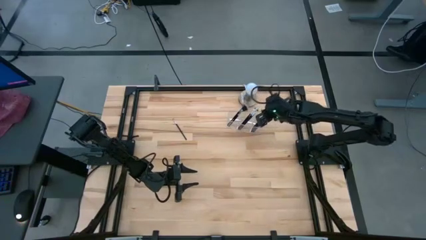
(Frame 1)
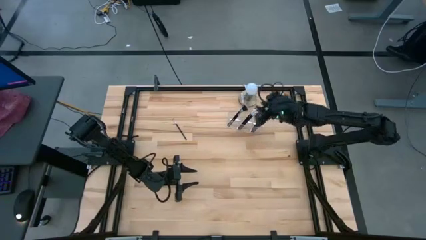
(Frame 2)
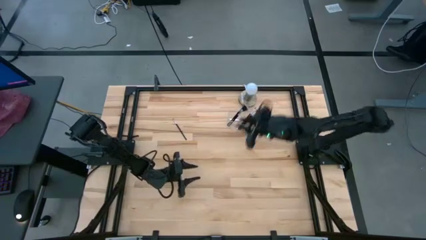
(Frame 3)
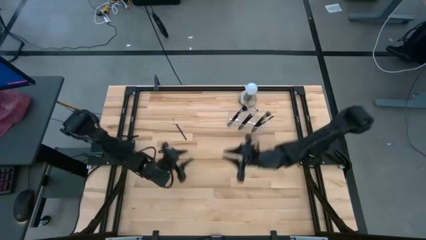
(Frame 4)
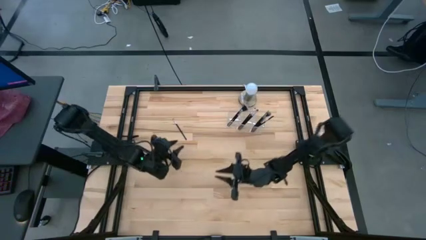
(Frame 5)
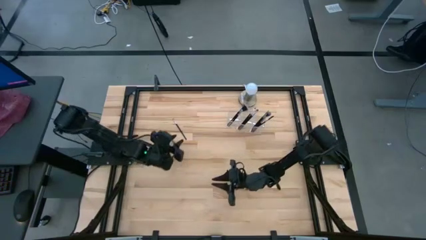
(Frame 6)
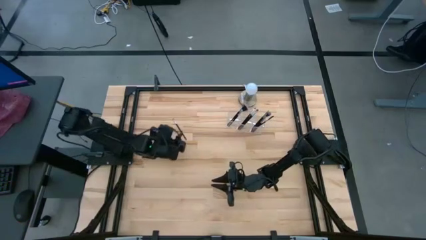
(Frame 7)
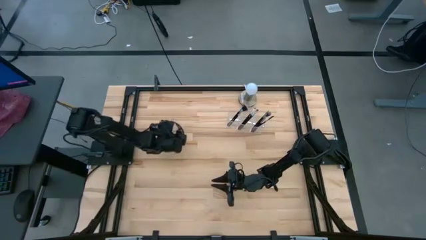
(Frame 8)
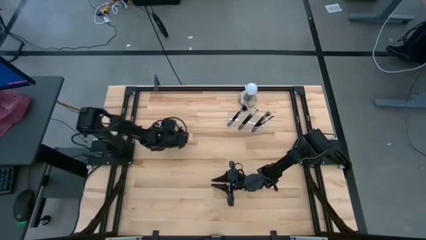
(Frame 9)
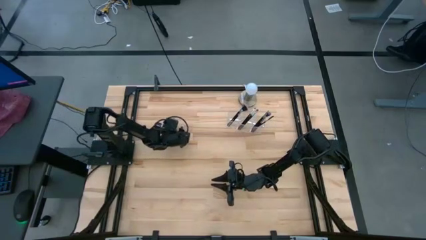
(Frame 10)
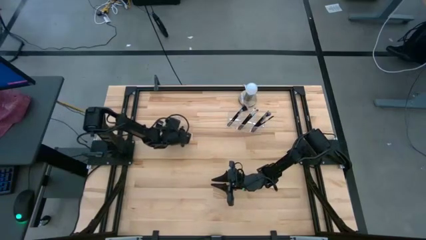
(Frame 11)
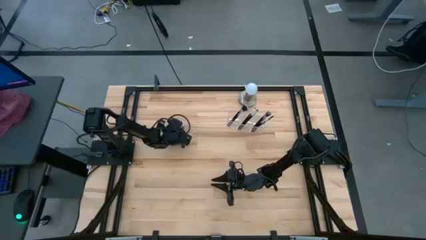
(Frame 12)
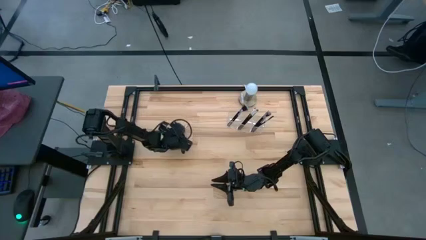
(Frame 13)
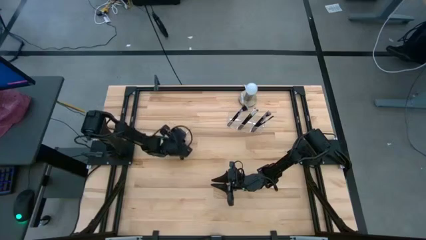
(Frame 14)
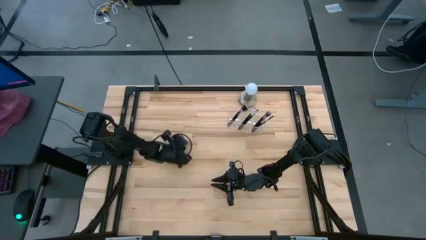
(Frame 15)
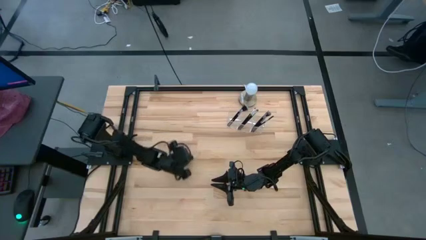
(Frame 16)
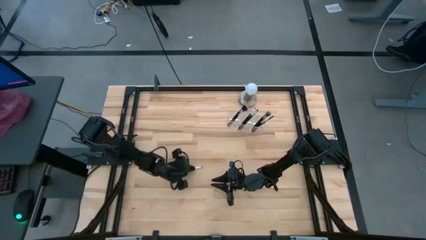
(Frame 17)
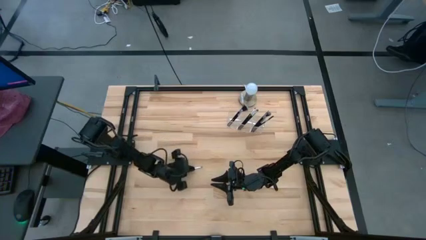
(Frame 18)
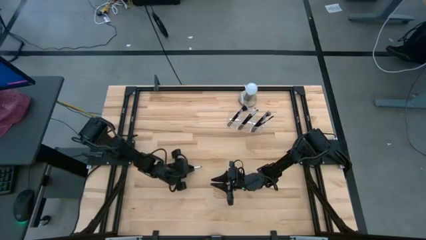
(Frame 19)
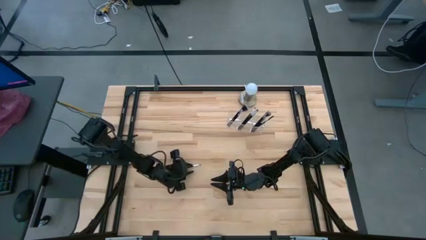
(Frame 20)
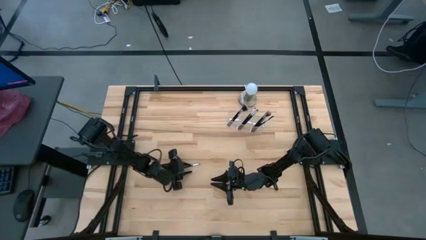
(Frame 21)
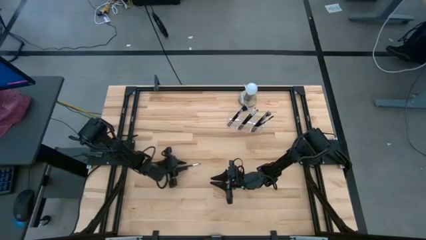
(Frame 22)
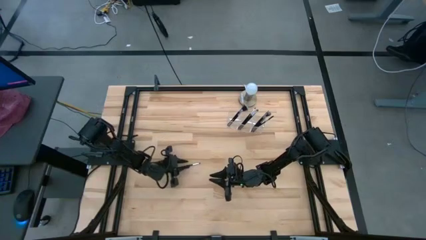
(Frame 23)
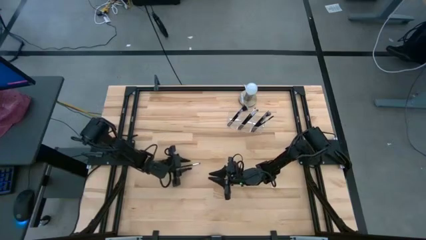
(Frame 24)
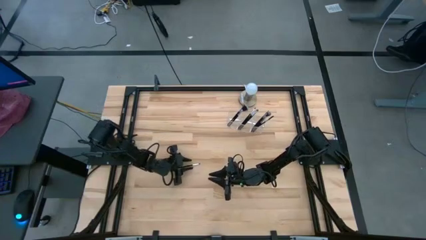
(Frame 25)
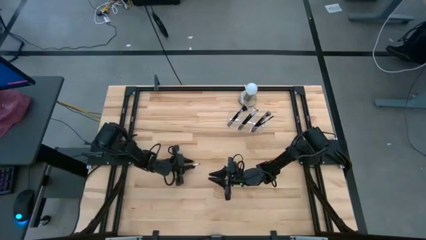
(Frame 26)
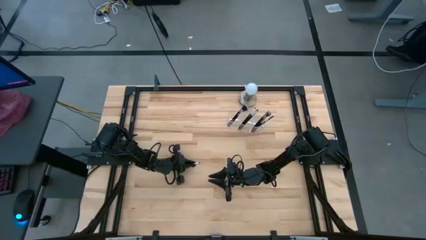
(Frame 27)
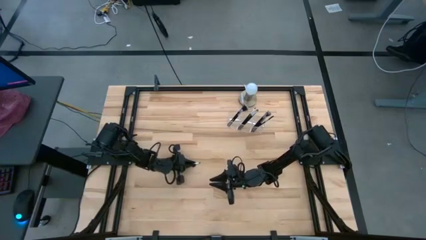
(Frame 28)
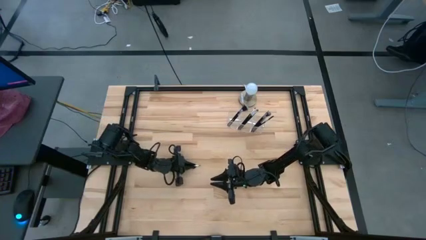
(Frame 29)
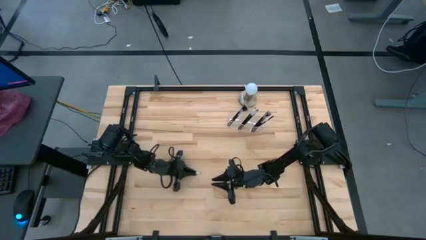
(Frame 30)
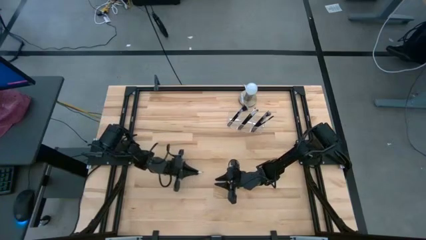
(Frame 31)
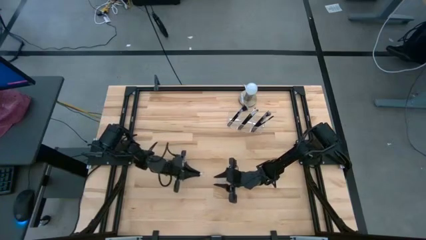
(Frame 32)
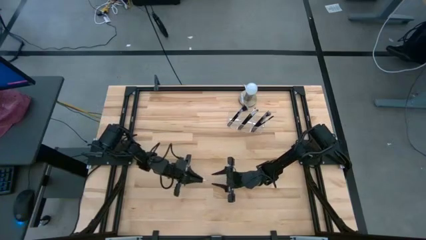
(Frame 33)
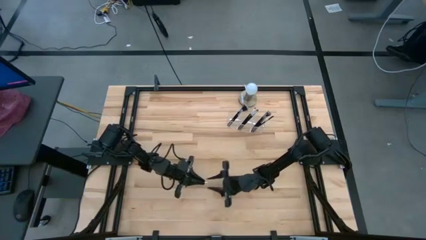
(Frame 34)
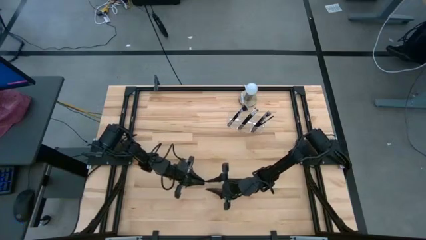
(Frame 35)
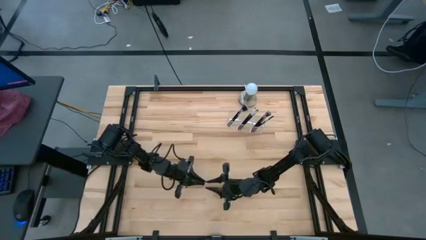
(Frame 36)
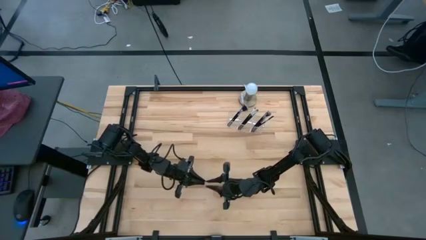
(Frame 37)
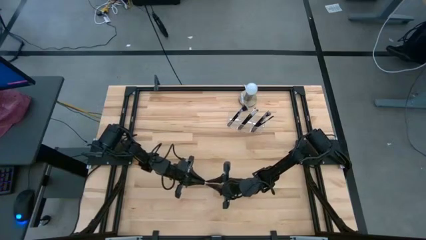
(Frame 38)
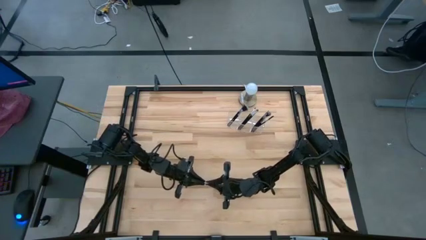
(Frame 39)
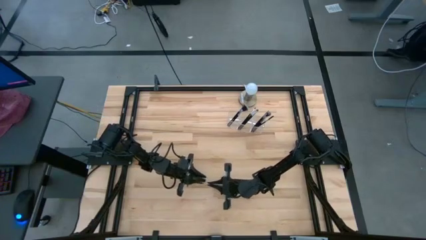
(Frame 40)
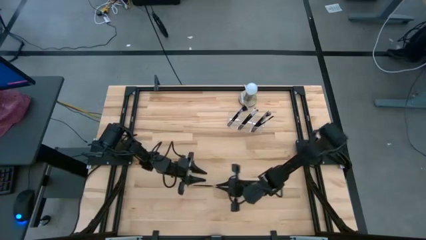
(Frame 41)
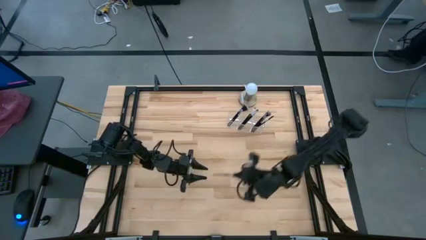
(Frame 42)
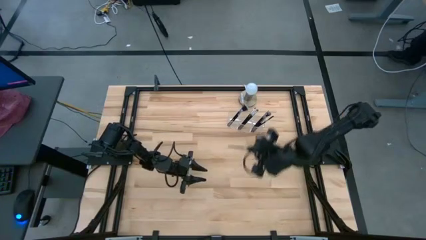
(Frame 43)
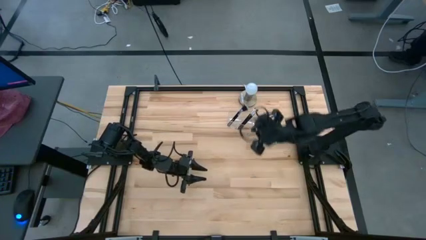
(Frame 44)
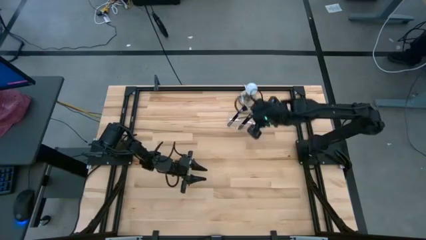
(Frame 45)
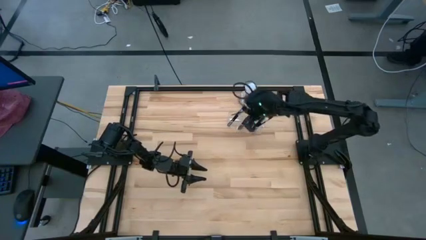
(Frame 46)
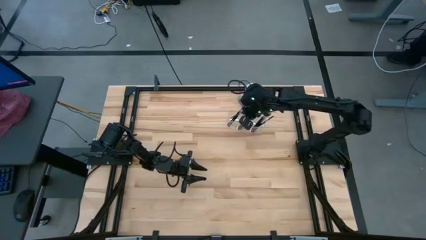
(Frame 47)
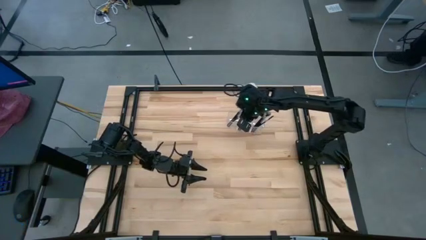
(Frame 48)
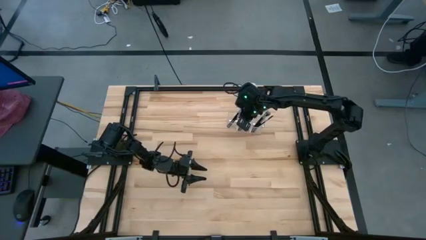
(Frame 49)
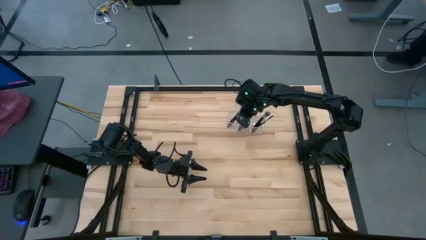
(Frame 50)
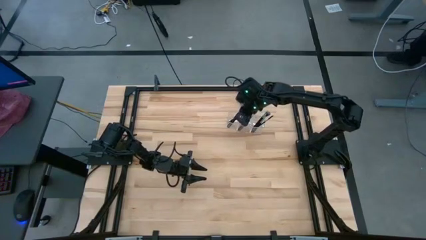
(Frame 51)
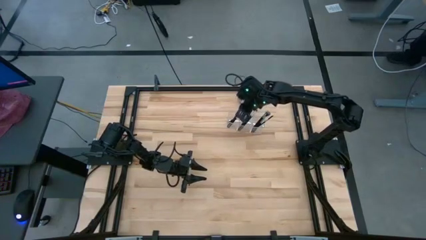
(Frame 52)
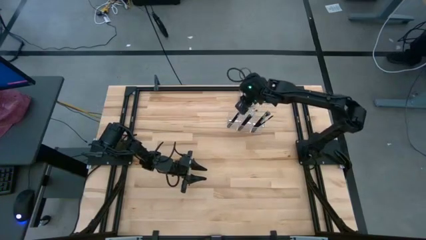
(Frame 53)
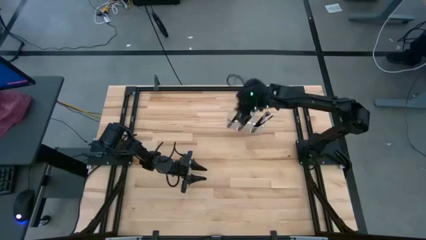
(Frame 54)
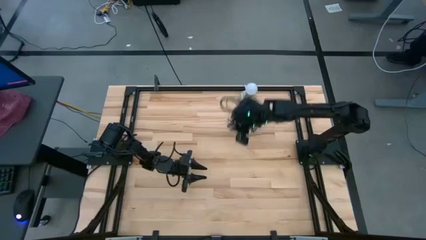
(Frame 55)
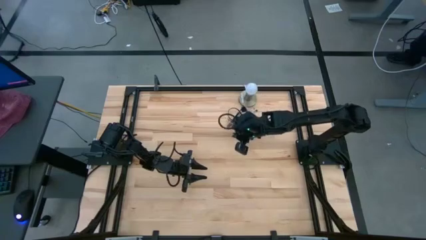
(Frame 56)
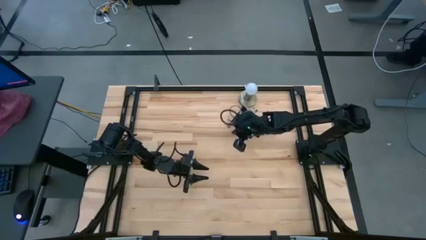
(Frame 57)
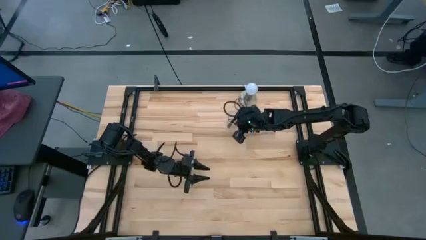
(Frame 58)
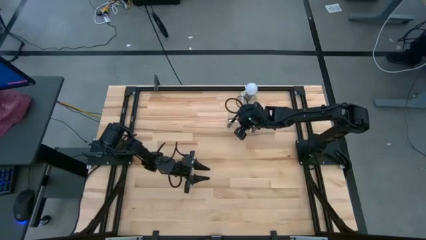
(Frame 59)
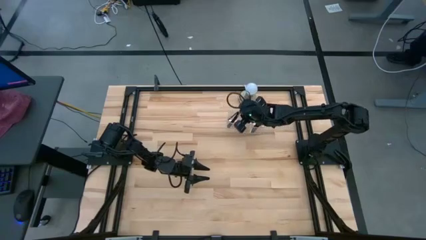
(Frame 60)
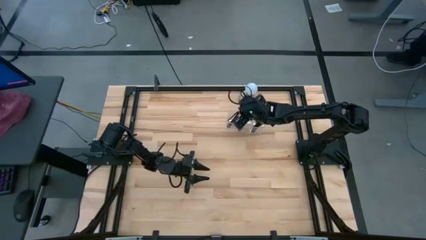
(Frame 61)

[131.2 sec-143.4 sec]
Task: Put items in baskets/containers
Put the eyeshadow brush into the transparent organizer

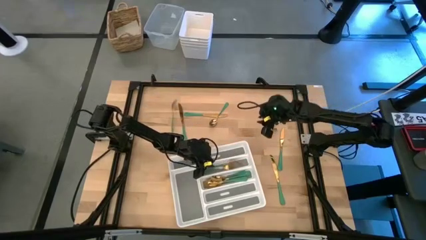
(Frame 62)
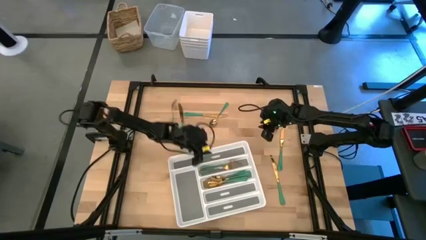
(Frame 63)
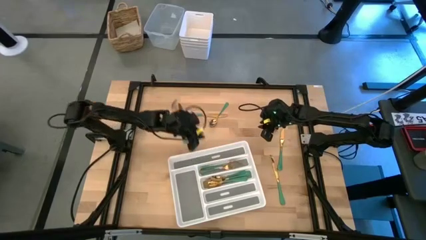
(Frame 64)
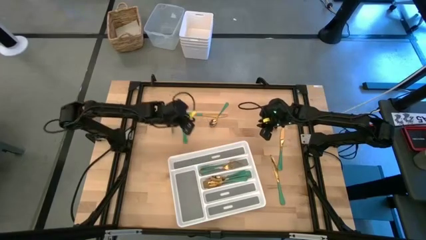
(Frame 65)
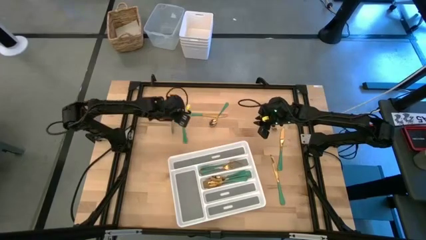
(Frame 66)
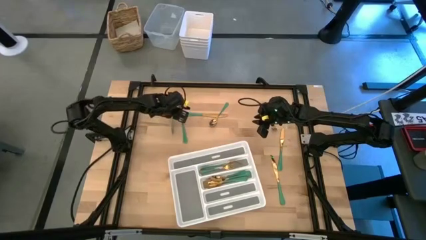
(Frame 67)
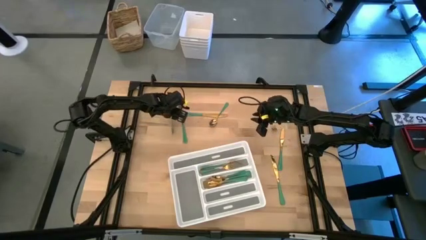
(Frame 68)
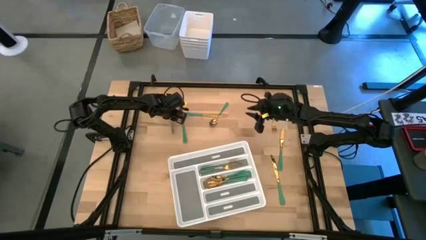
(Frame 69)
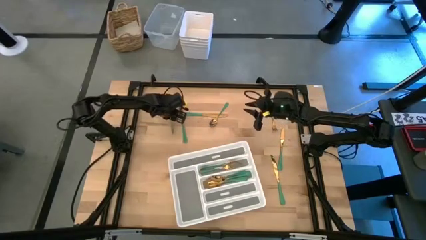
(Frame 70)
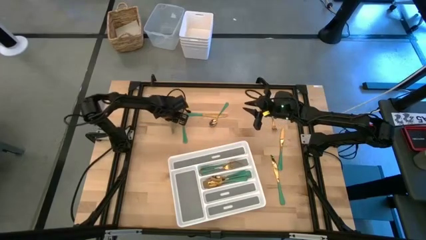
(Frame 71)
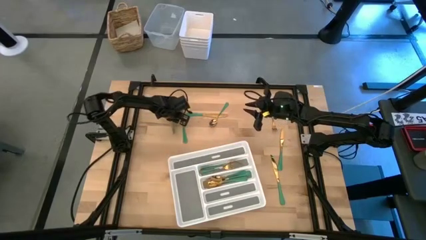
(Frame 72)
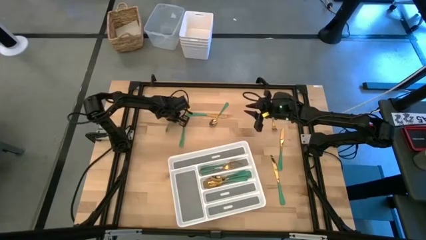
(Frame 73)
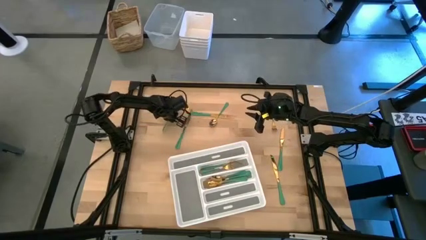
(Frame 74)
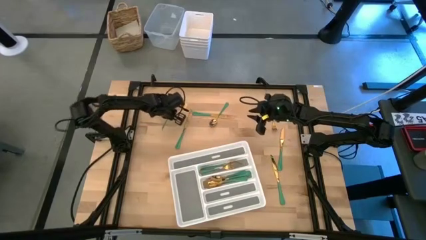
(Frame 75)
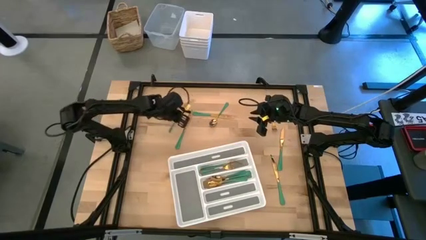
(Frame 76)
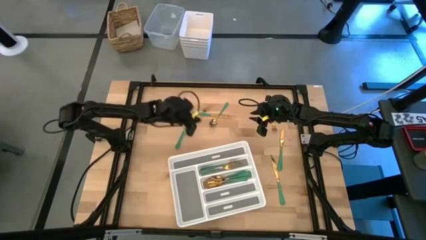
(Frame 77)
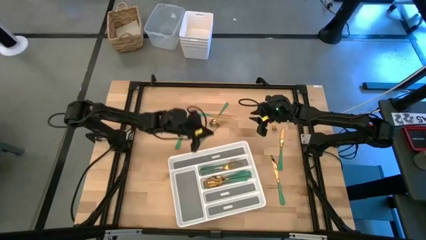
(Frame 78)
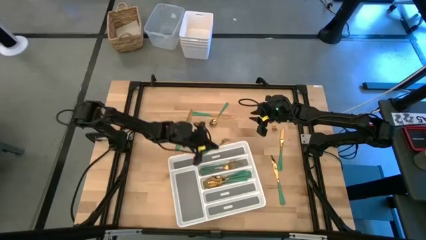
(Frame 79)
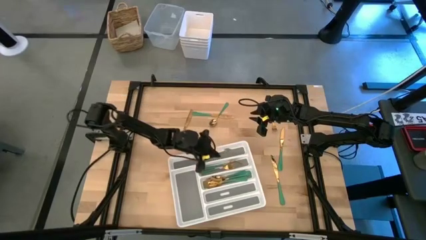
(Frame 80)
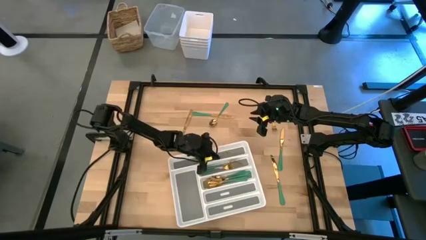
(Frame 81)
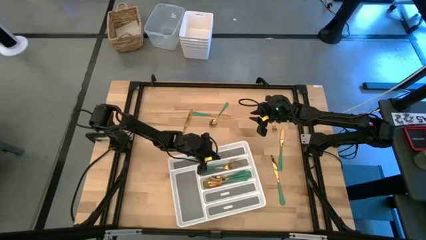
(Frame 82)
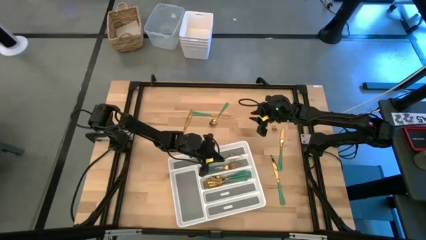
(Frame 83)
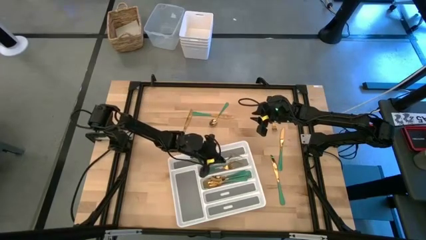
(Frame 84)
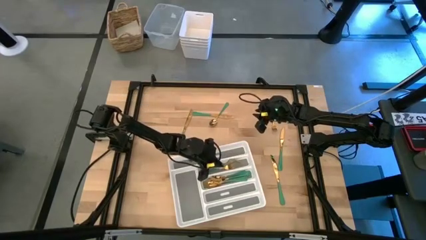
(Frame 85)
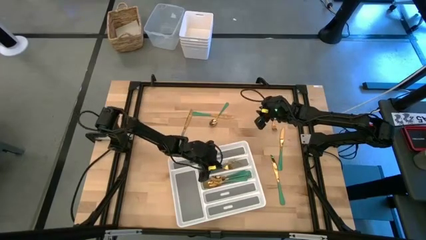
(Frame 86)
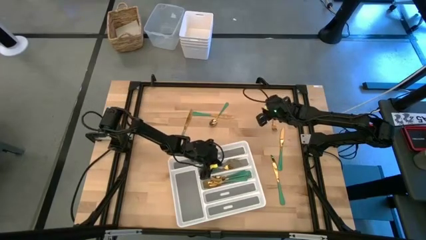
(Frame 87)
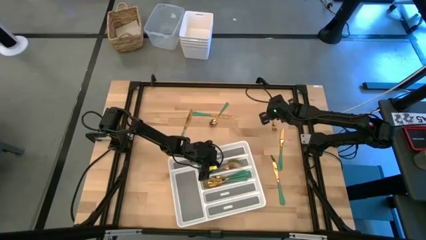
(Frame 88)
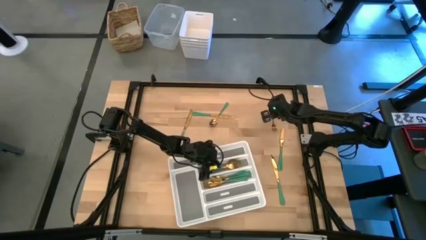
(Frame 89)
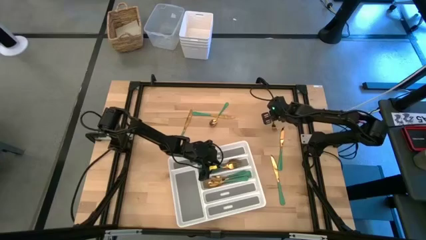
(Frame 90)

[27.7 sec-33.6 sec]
Task: Sort silverware
Put the green fork into the white silverware tray
